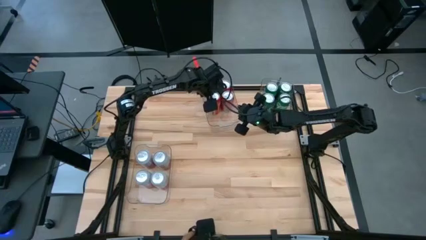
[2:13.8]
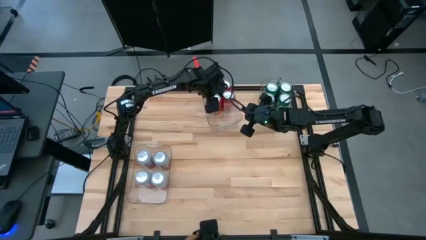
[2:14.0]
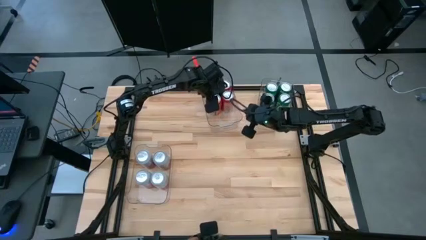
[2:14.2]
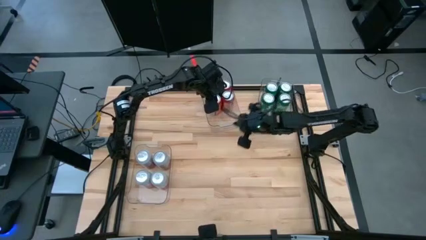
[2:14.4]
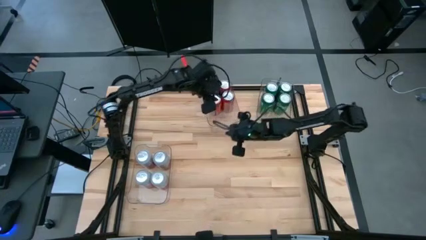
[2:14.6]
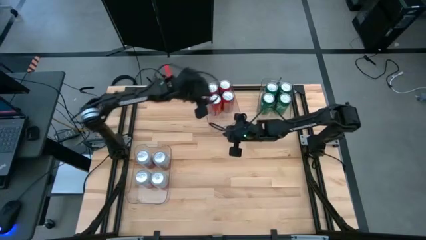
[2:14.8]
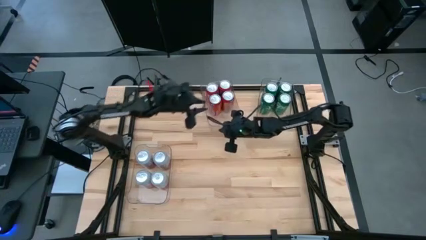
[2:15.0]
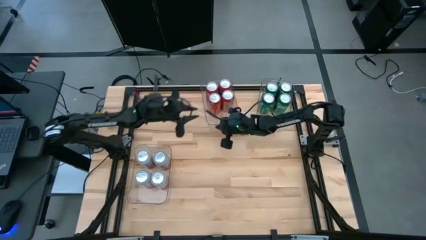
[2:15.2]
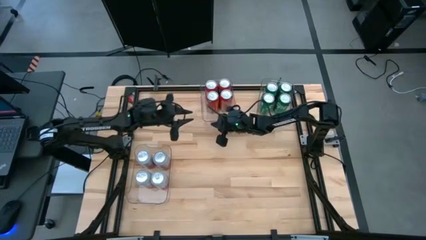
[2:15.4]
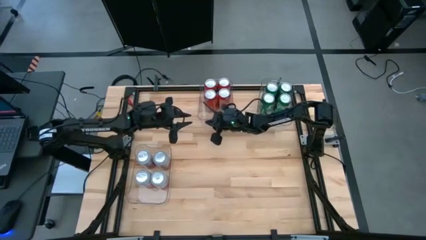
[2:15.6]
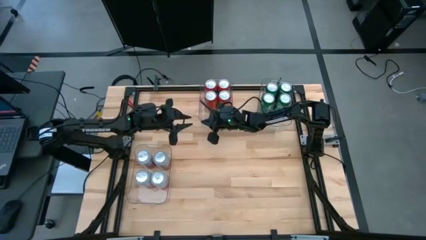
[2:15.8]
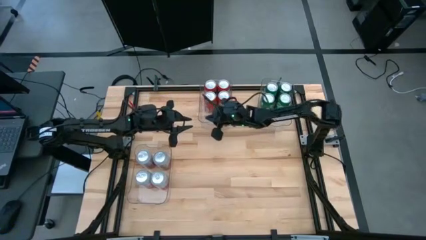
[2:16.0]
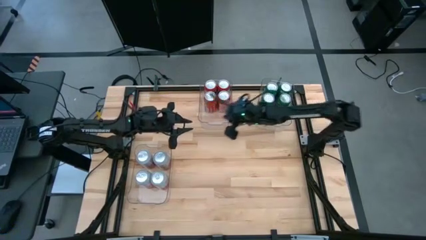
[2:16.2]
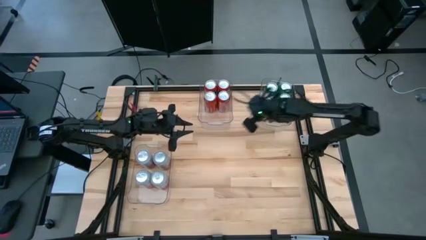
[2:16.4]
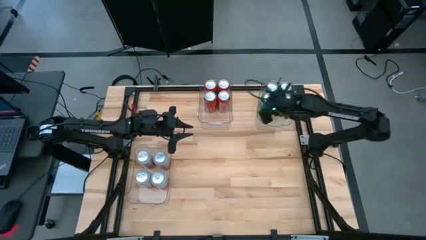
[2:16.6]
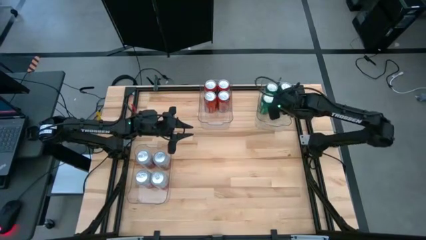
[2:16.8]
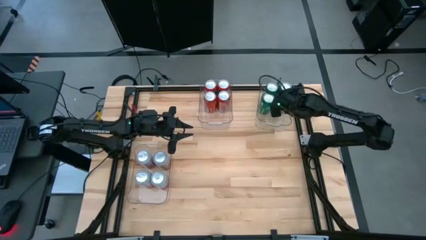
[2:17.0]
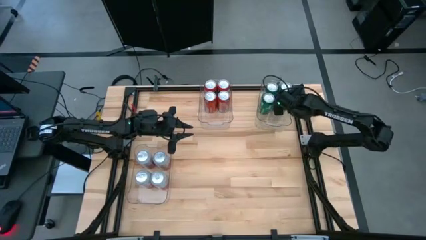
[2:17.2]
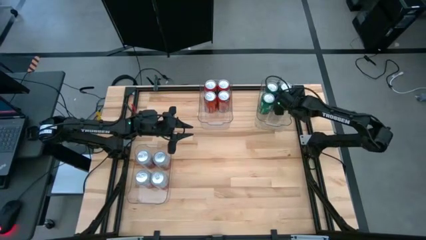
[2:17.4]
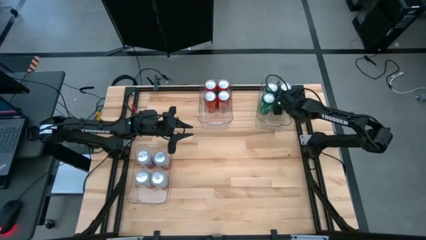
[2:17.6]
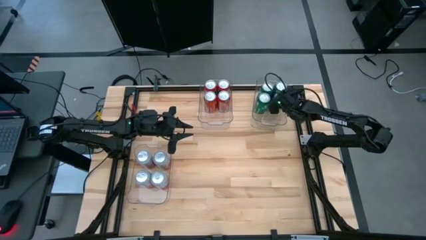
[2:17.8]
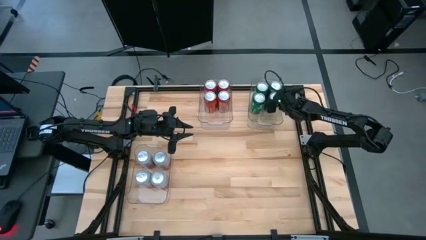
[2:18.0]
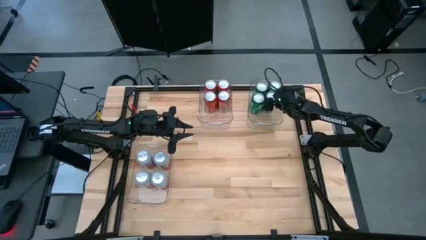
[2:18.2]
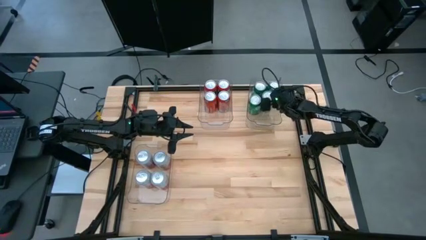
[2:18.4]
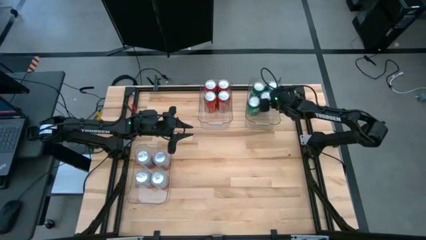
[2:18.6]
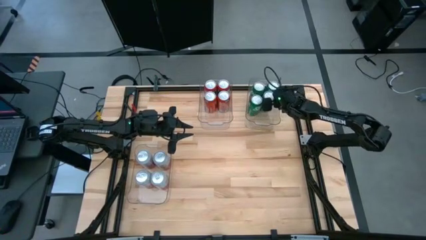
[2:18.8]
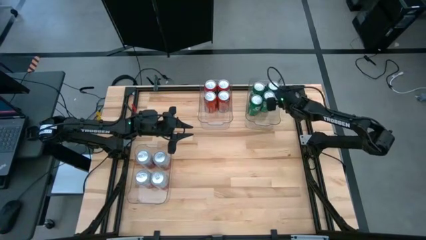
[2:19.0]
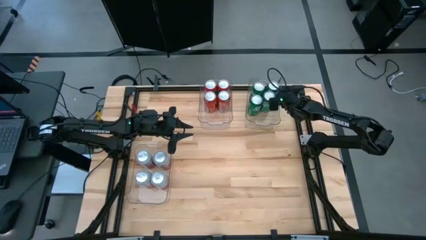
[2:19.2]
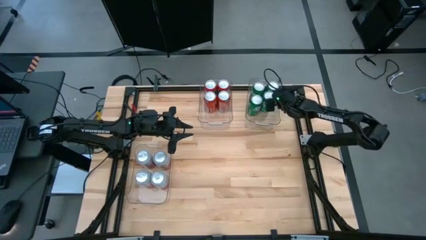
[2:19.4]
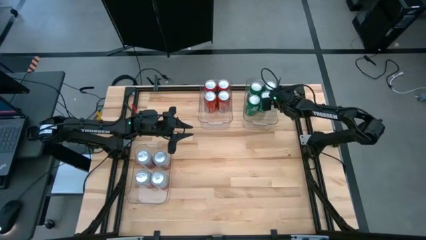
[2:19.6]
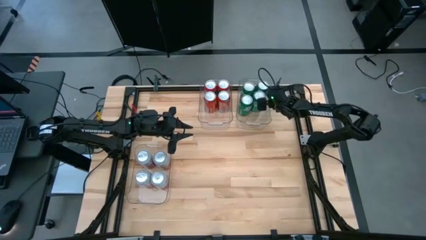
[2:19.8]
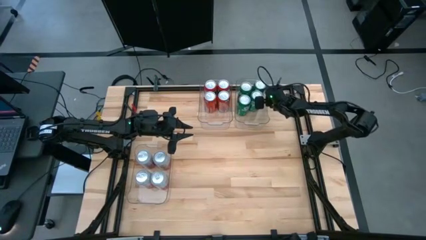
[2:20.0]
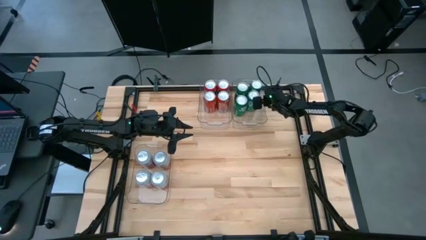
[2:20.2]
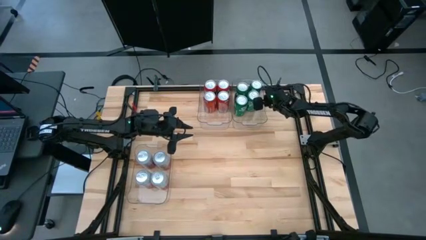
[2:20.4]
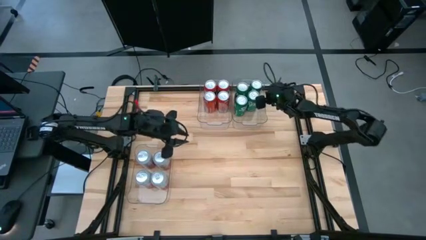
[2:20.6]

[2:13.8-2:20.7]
Task: Sort soda cans
Adjust the top transparent bins

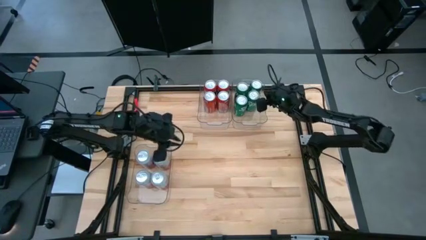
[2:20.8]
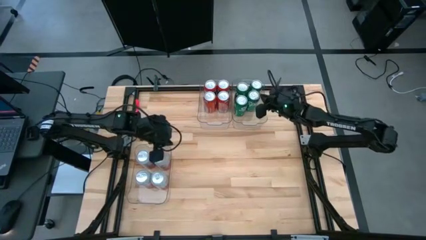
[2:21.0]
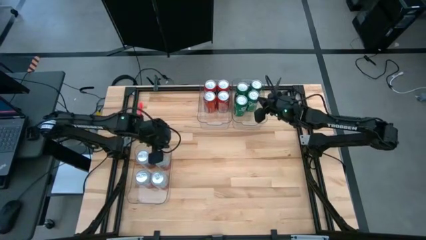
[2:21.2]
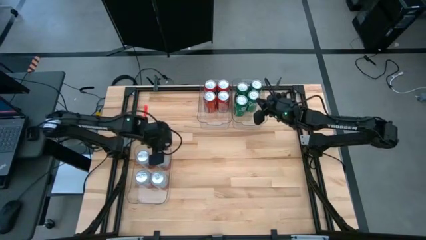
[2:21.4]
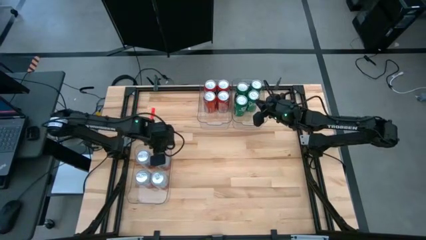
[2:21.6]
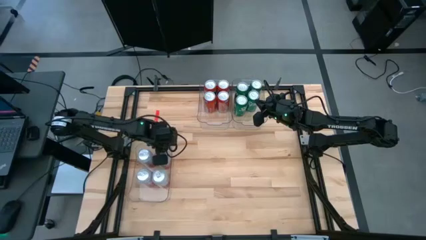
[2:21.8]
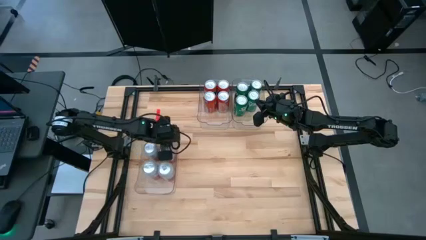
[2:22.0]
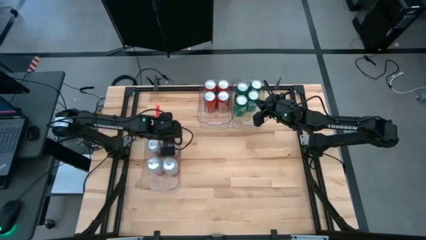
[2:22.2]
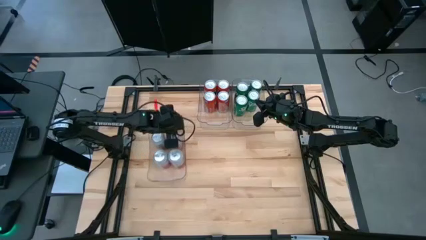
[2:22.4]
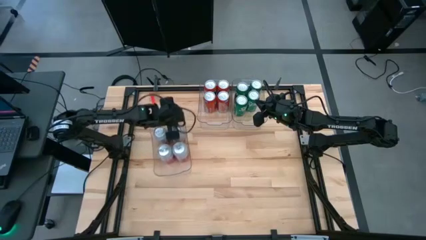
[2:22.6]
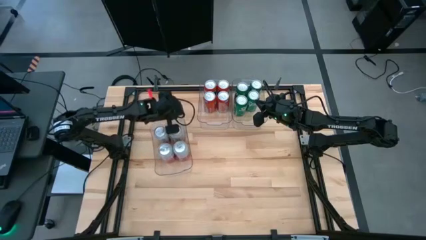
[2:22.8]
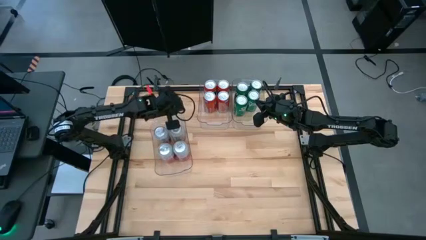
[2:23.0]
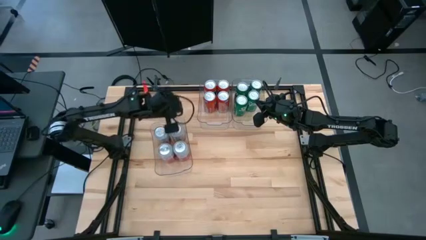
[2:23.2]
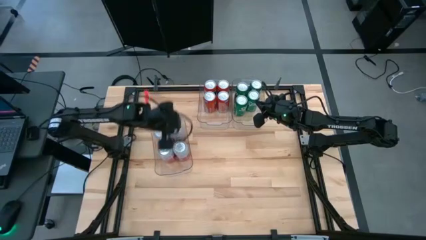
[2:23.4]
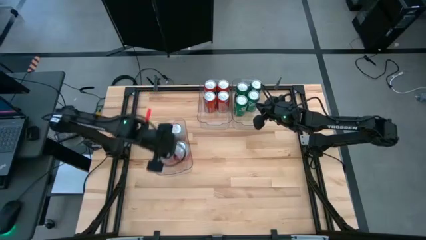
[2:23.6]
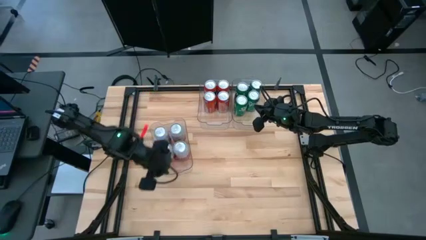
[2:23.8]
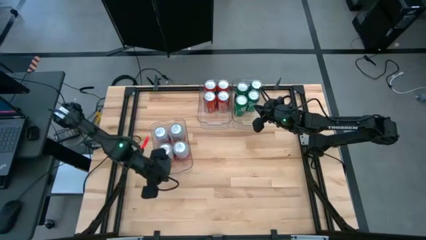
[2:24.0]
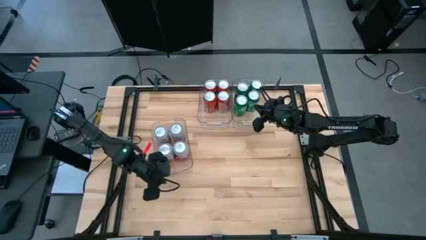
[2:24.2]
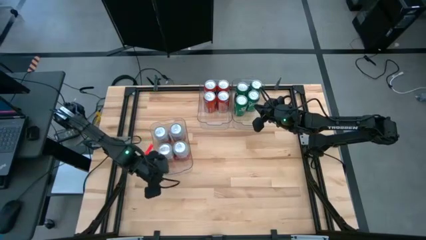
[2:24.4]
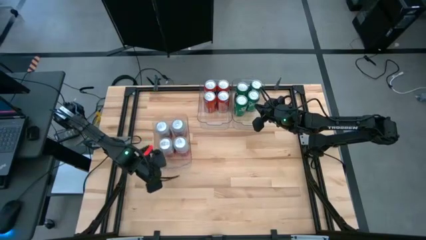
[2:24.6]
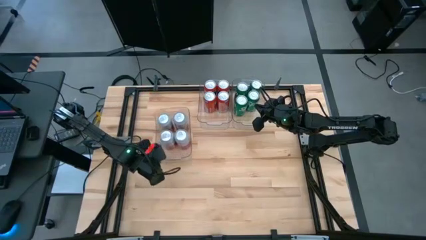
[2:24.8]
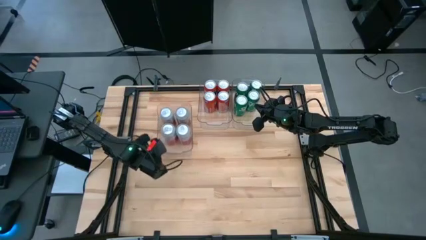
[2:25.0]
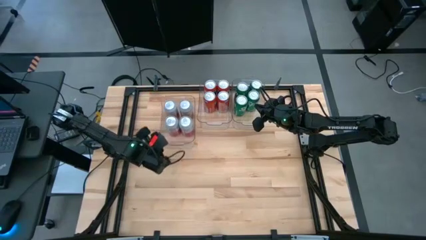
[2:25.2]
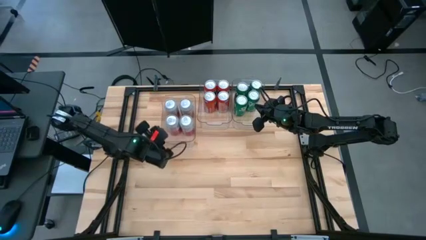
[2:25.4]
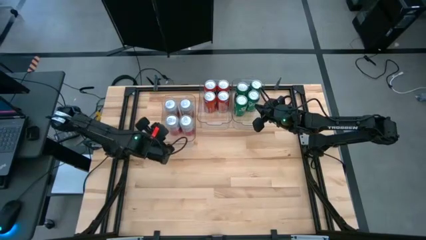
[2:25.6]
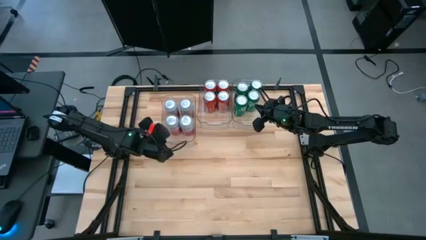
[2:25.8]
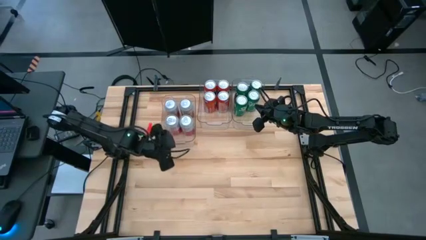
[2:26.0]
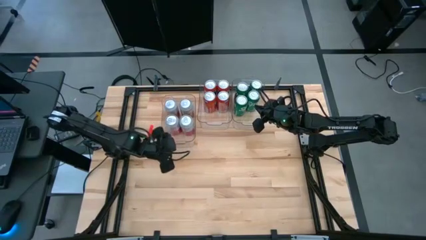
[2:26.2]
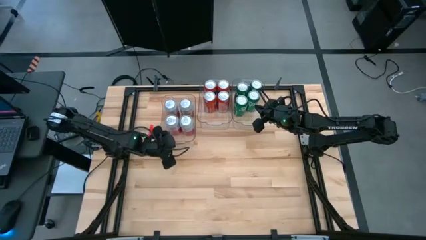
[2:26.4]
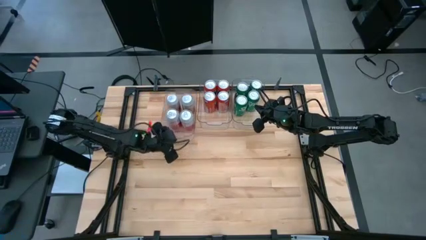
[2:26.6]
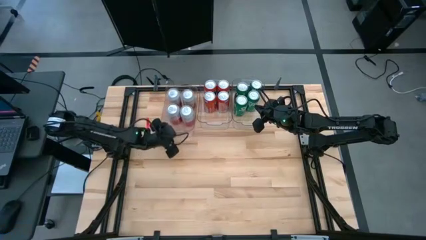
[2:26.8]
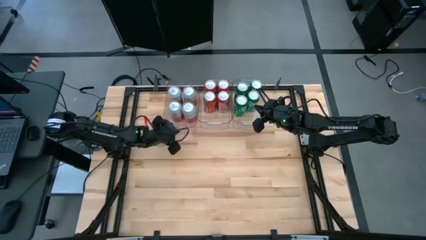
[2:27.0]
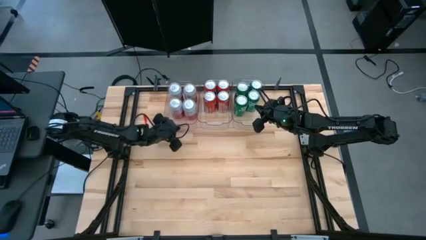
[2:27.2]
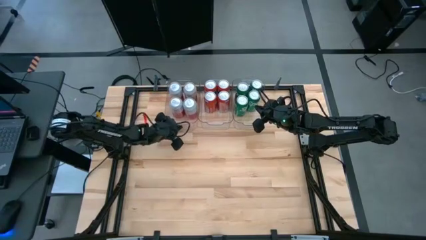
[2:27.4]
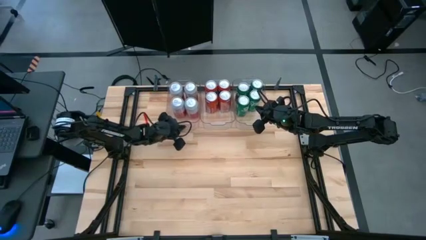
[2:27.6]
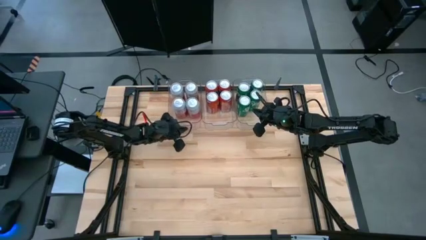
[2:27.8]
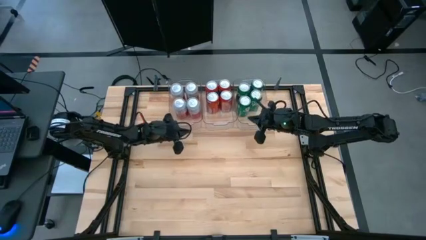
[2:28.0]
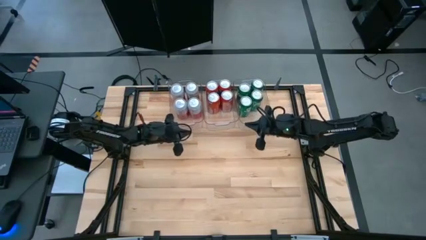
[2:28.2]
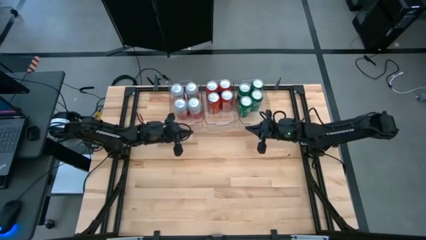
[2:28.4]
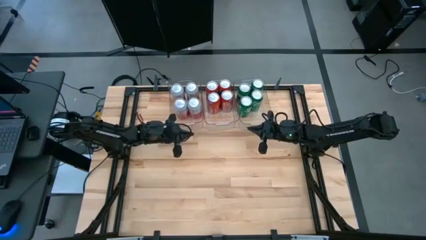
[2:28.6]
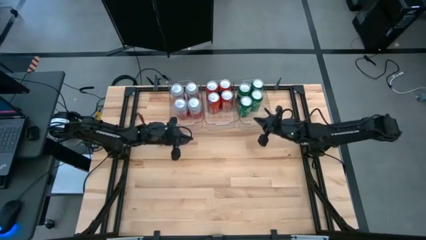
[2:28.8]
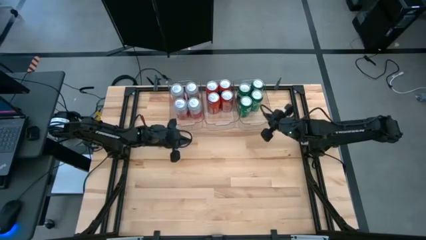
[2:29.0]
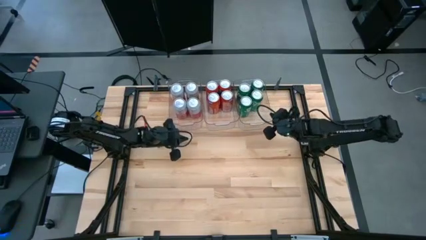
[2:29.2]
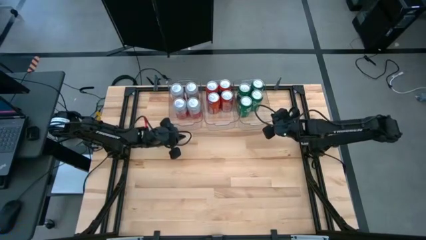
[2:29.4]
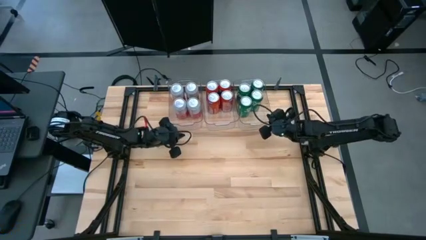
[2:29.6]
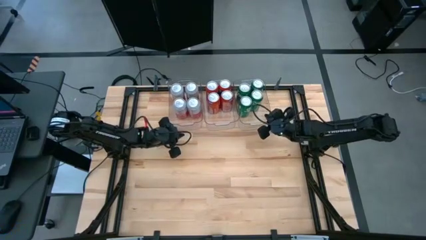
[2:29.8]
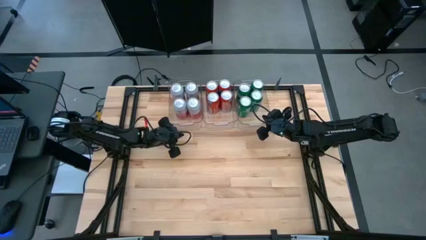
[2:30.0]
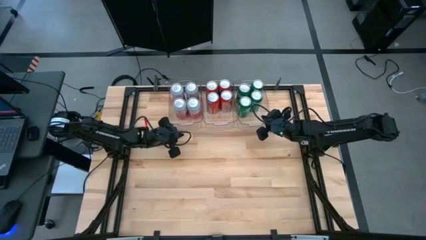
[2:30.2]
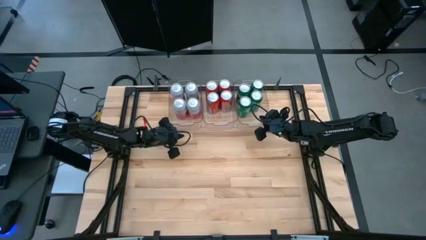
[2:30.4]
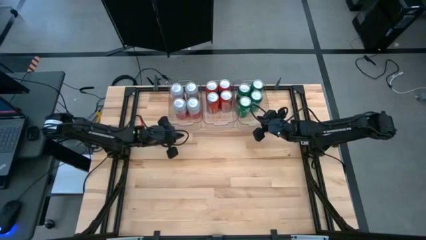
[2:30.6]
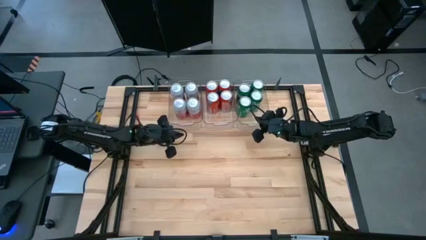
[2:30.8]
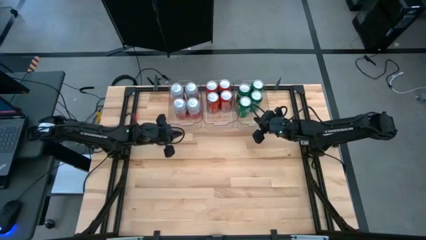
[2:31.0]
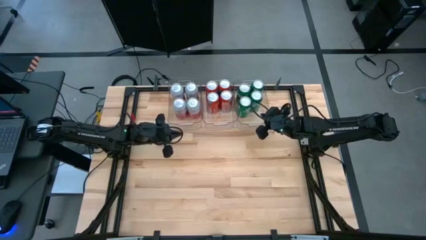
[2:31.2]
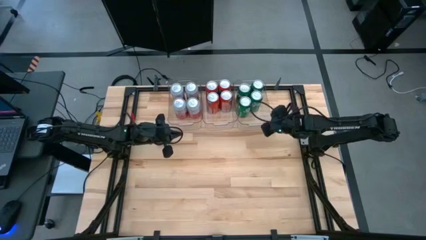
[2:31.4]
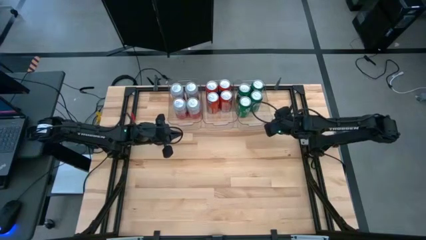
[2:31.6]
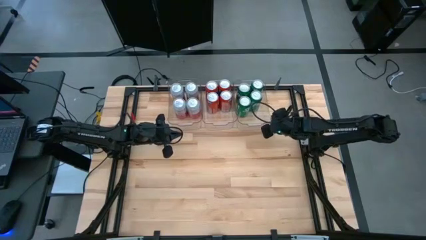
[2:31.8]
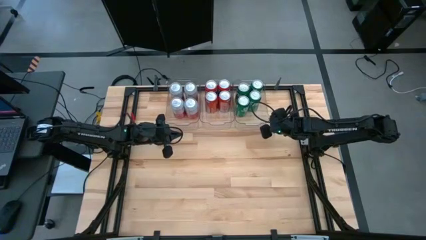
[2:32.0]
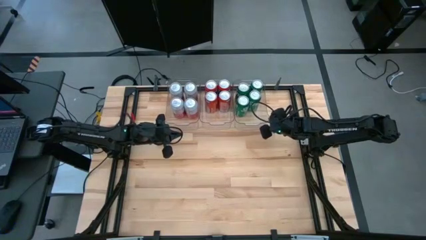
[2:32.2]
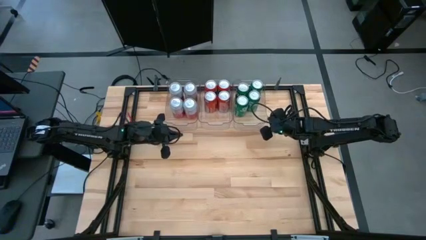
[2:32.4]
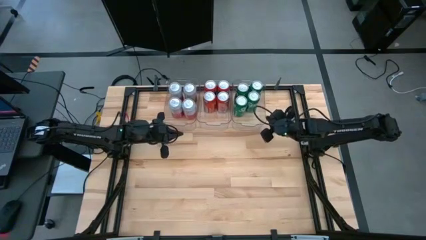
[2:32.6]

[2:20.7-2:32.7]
Move the bottom transparent bin to the left side of the top left transparent bin
